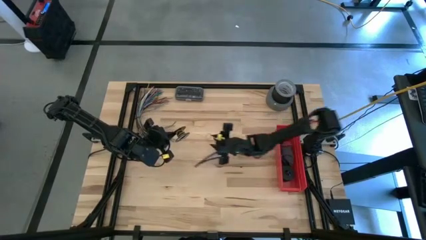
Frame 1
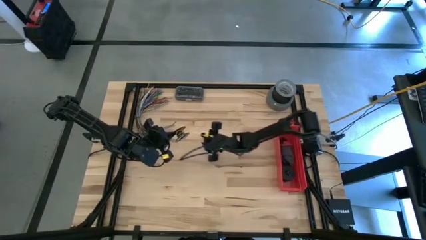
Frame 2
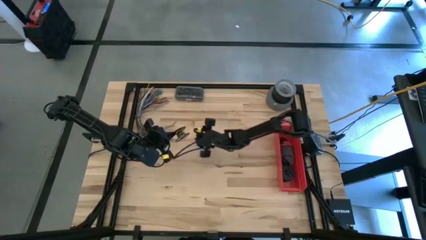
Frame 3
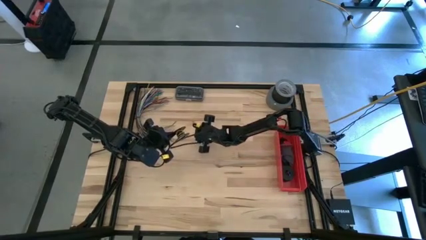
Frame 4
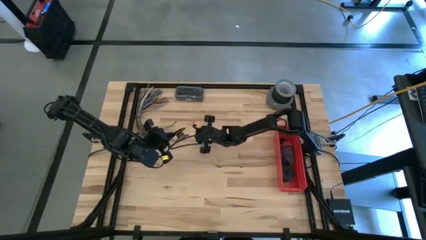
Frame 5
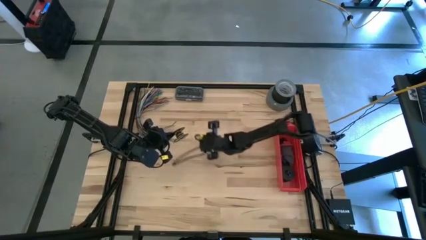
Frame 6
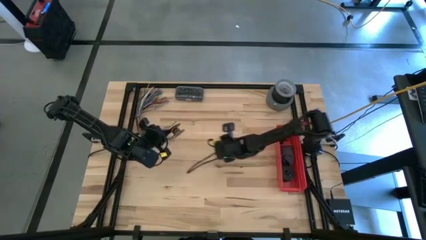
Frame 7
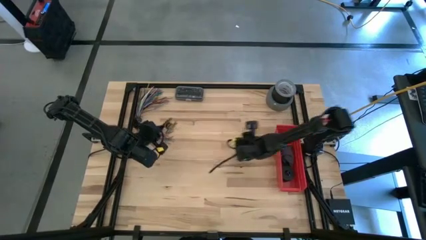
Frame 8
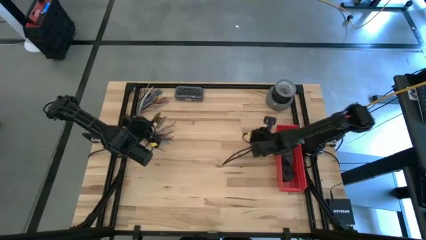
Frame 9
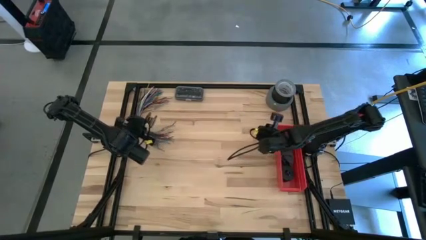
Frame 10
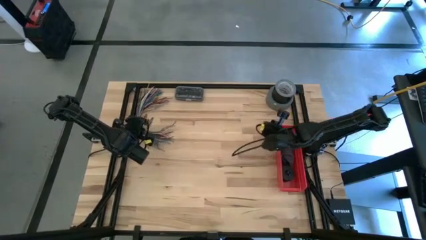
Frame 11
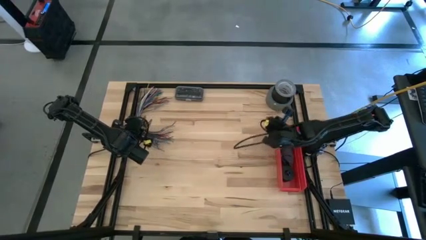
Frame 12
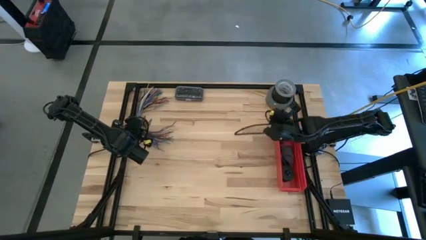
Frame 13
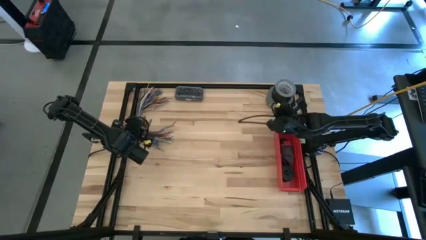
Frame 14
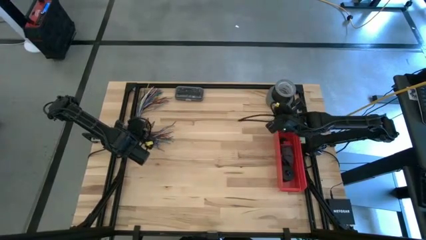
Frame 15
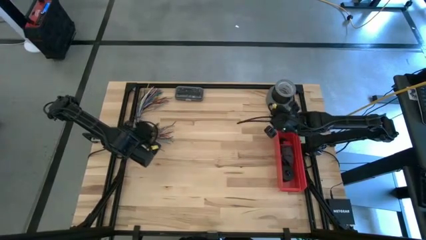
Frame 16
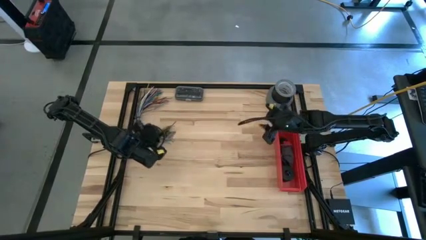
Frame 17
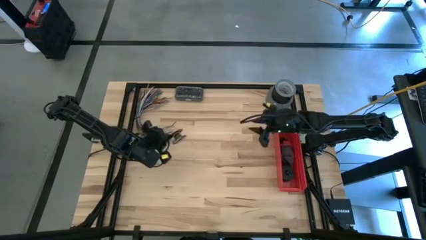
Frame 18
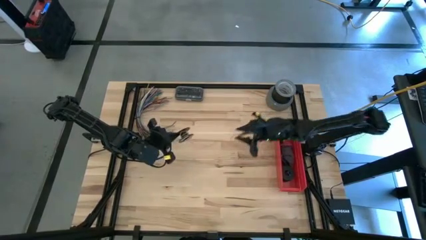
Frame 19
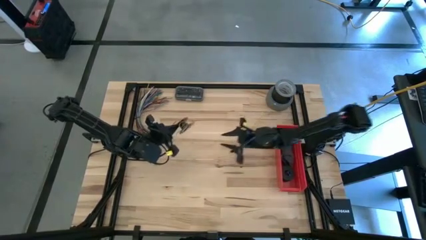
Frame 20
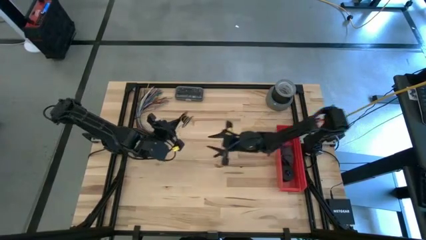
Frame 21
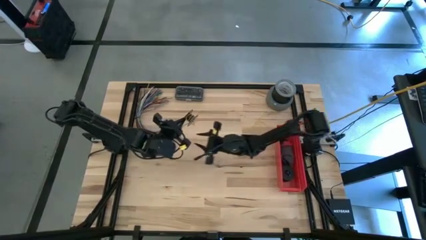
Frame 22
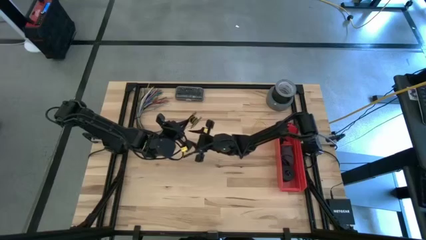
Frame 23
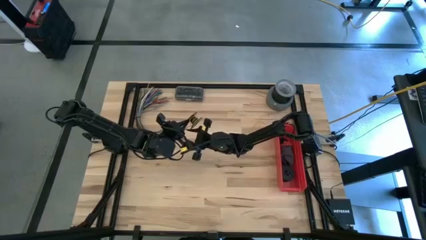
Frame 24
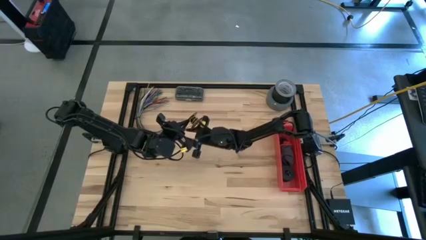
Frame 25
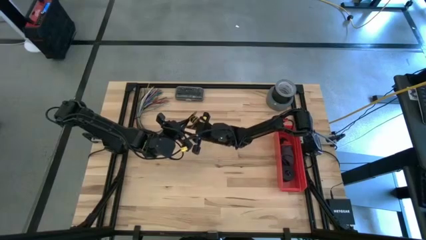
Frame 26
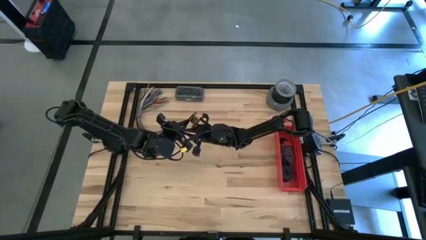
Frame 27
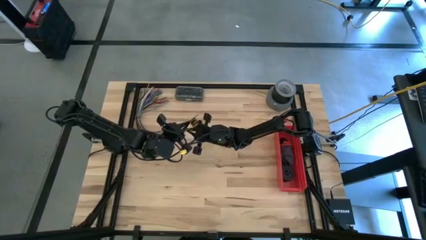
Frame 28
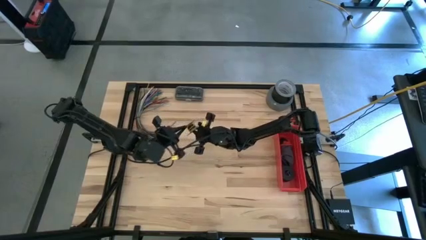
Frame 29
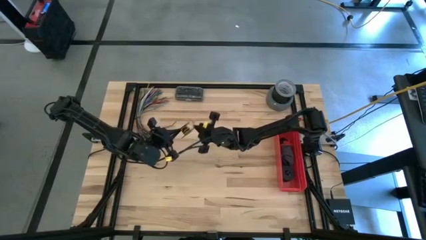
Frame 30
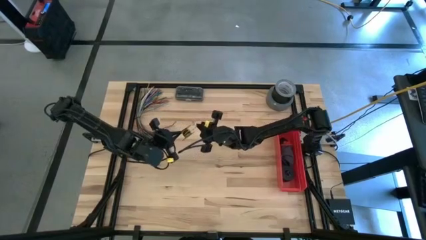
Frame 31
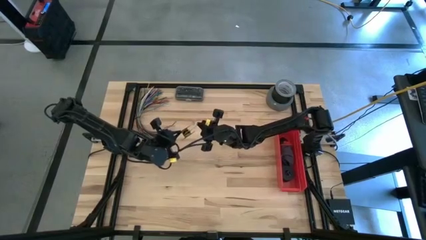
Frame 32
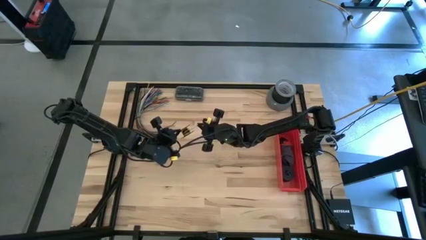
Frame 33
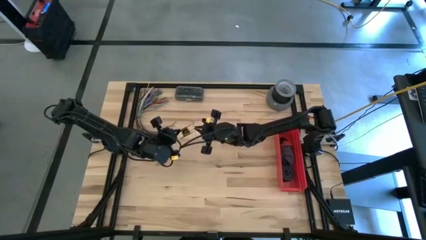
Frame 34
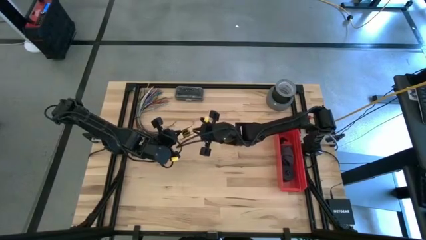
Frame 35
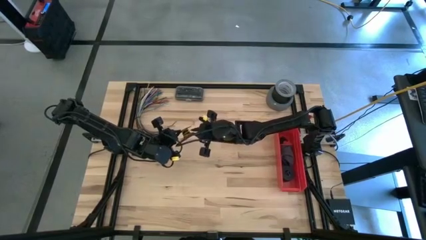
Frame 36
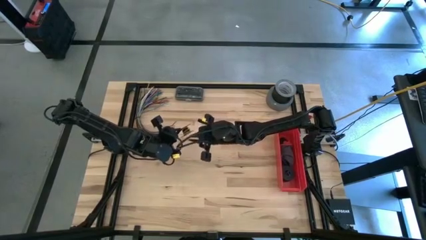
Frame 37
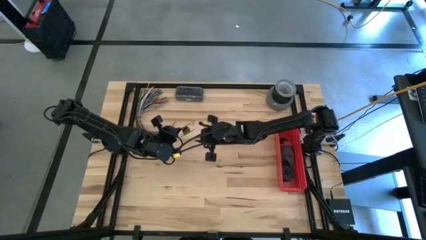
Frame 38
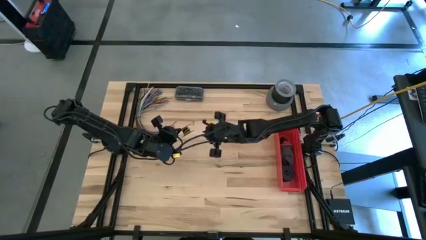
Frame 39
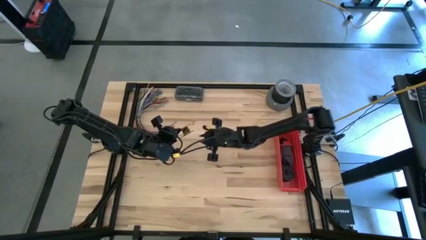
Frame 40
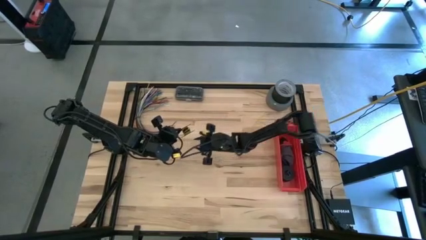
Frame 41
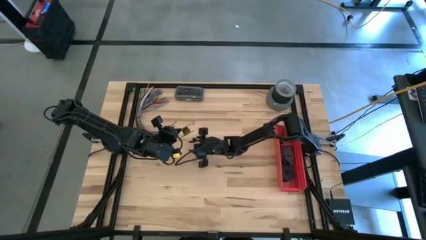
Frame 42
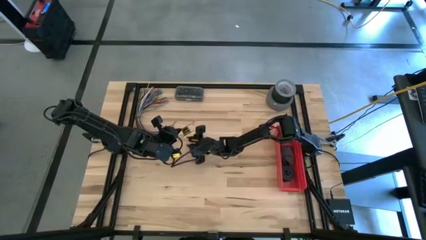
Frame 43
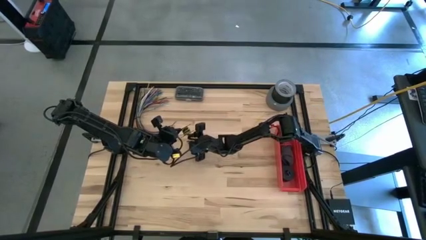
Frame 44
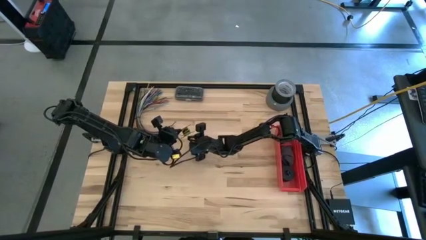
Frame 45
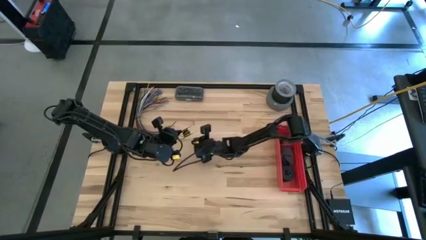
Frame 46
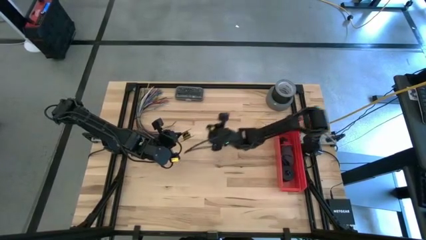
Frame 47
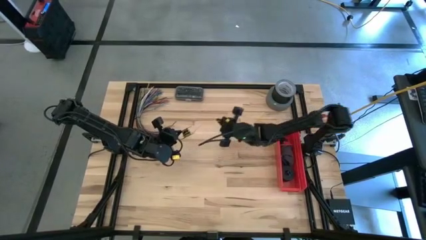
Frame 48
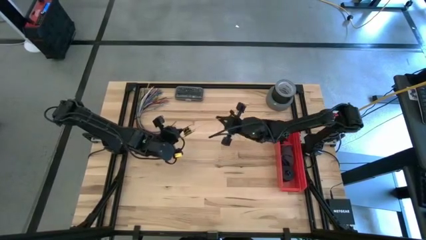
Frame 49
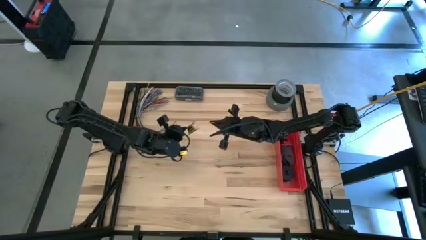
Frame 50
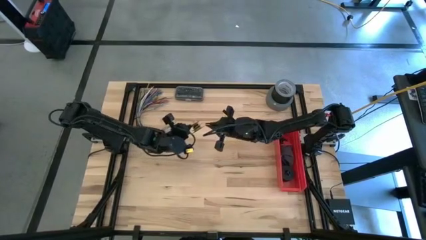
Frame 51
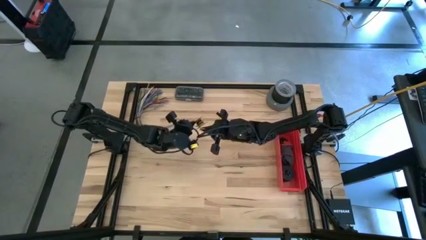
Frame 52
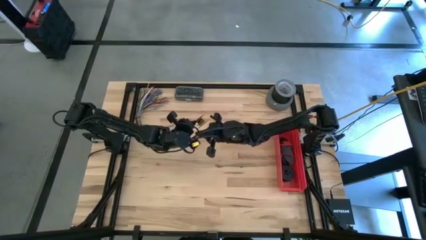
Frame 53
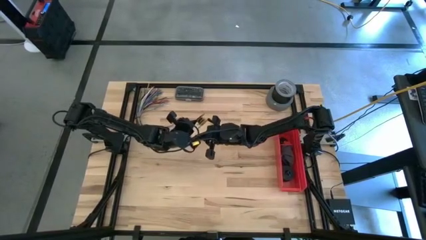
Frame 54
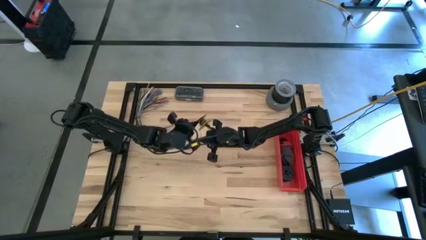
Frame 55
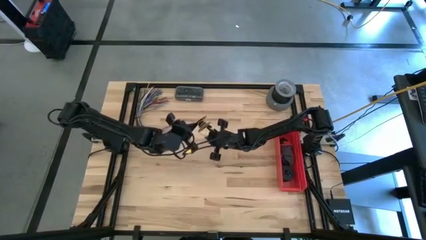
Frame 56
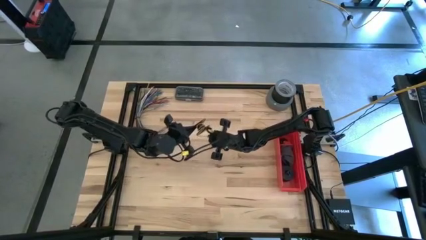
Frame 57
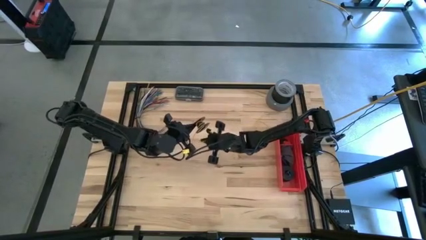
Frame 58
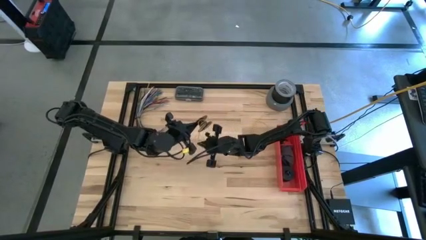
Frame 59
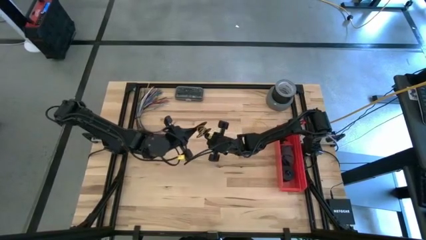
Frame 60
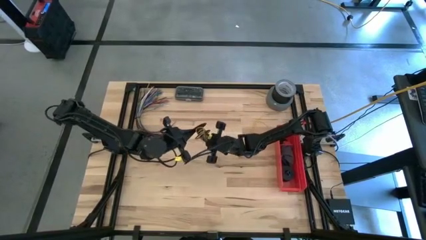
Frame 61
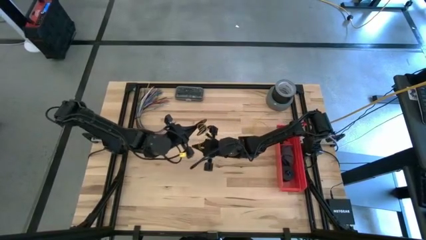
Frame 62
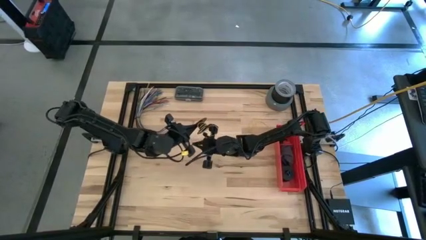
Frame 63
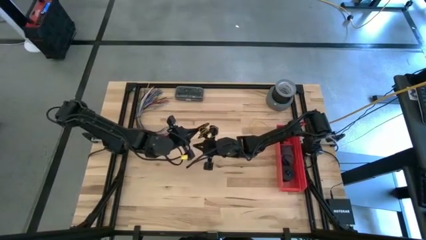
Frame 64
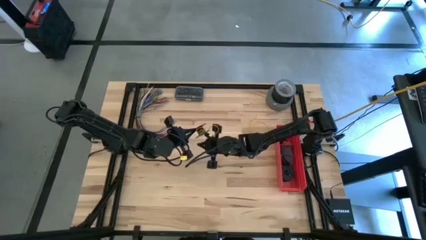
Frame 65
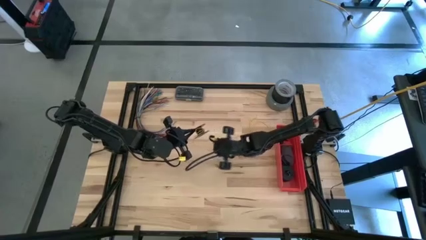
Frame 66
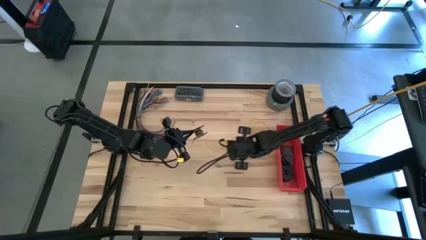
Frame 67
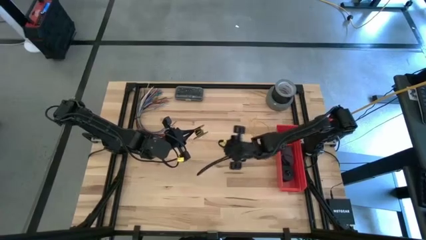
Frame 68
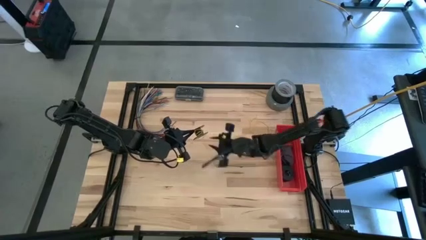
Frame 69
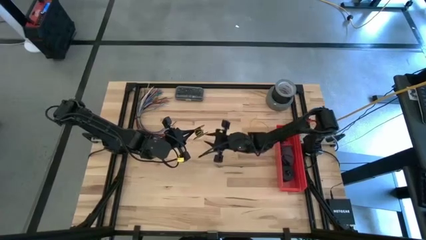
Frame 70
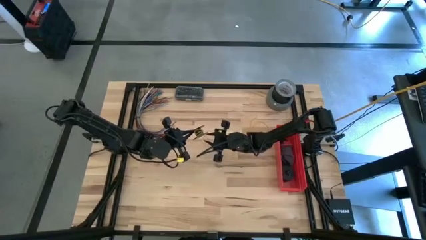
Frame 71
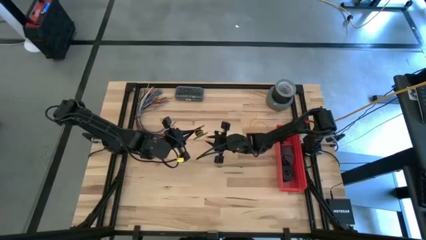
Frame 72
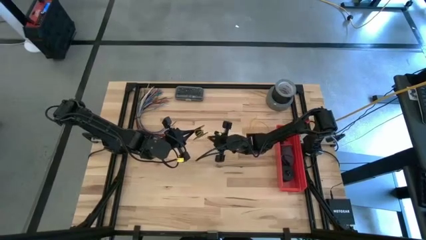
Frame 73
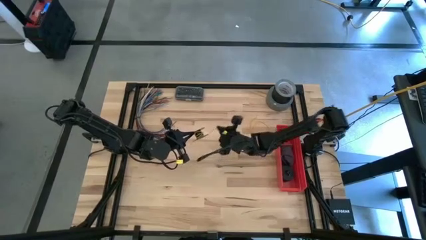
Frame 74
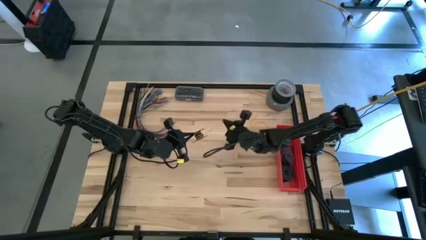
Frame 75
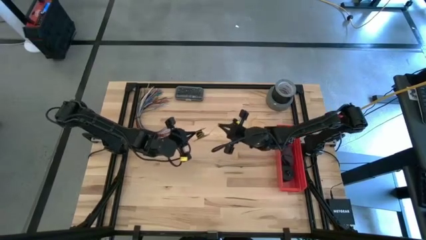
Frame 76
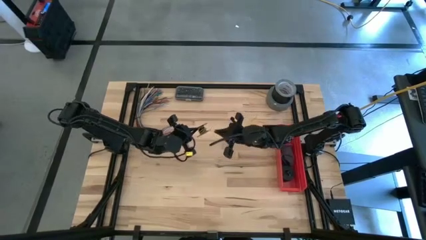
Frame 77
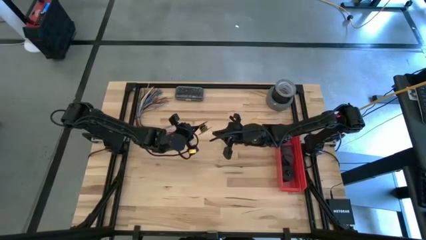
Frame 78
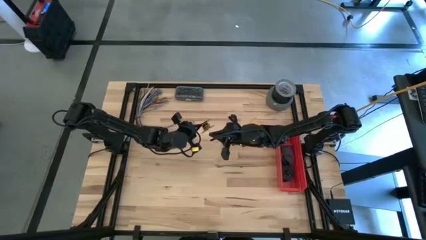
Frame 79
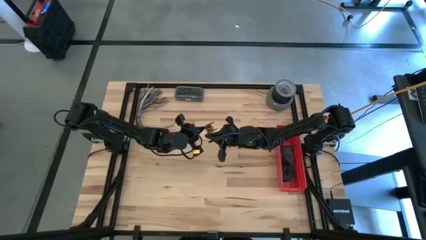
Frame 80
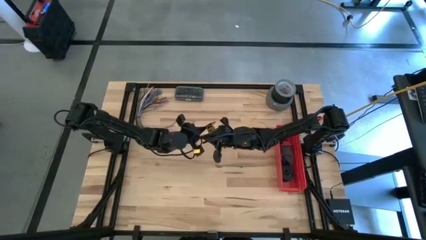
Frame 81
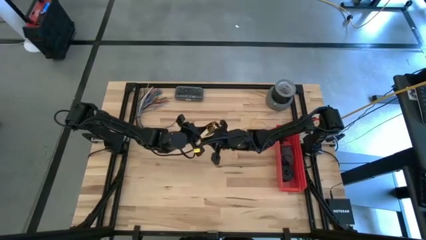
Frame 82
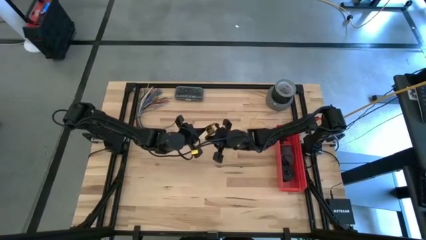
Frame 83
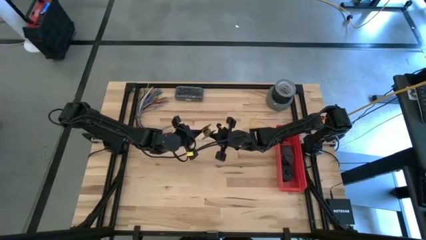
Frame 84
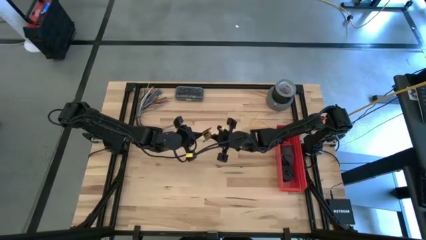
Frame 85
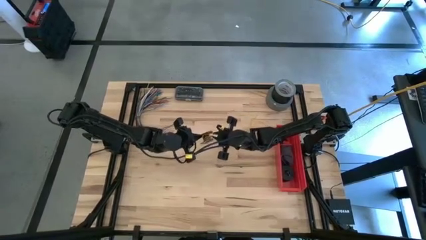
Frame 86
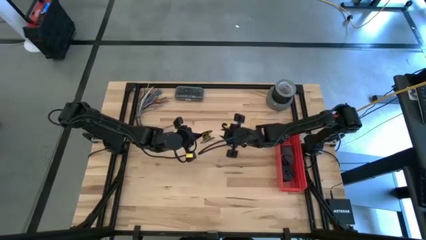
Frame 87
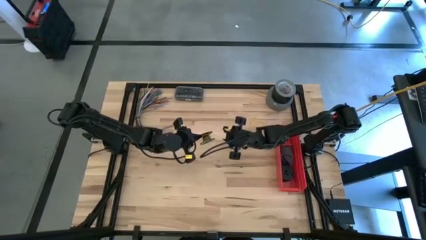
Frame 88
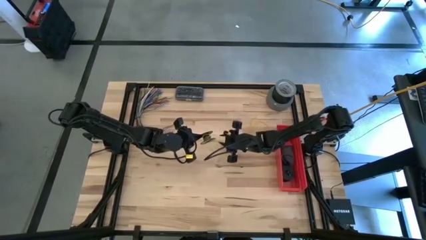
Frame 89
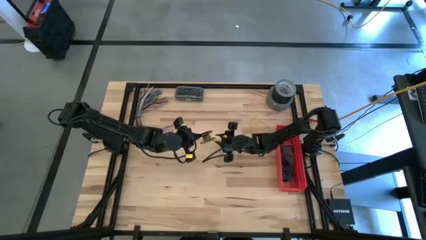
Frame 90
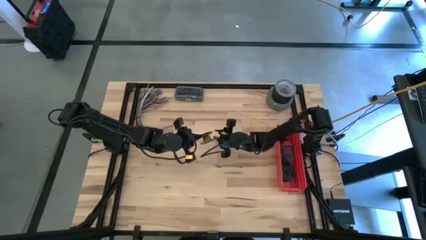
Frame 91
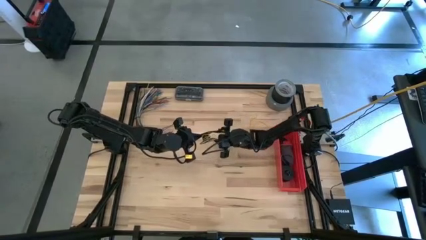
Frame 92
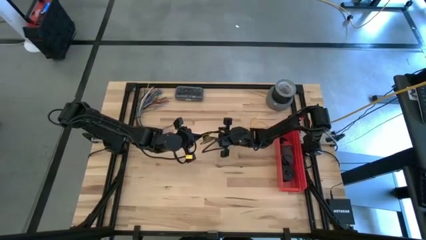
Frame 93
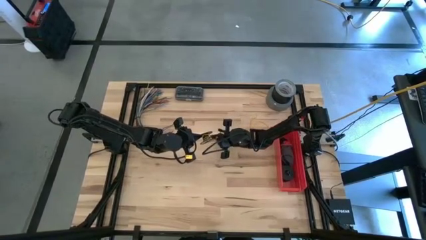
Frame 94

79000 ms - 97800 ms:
Task: Coil cords
Coil the yellow wire onto the black spool
